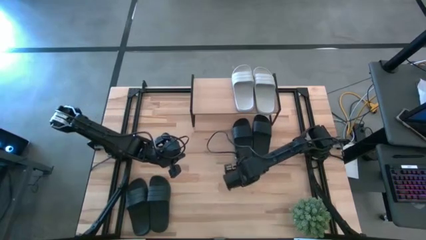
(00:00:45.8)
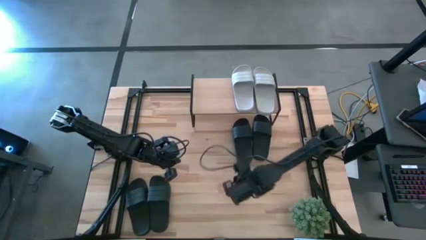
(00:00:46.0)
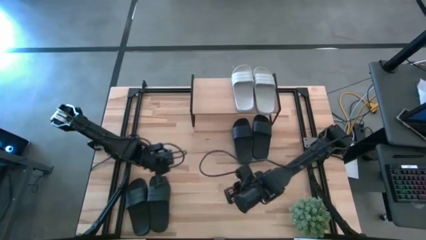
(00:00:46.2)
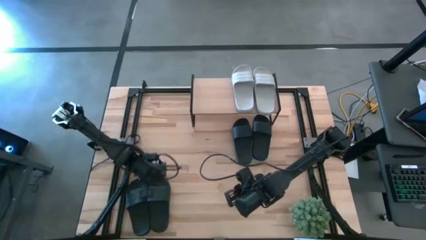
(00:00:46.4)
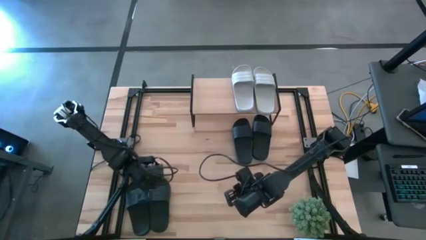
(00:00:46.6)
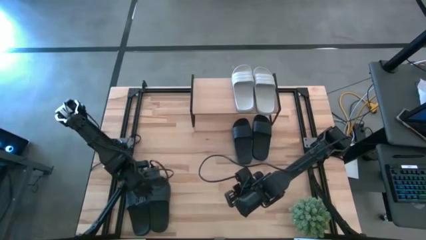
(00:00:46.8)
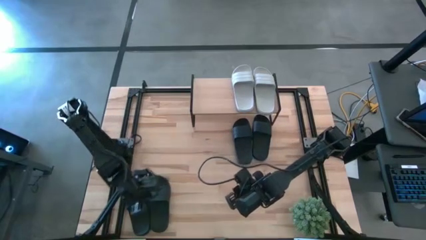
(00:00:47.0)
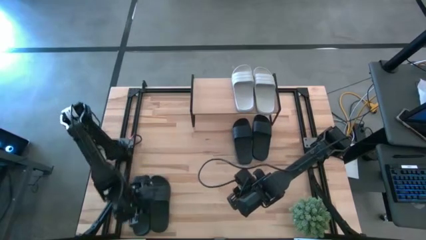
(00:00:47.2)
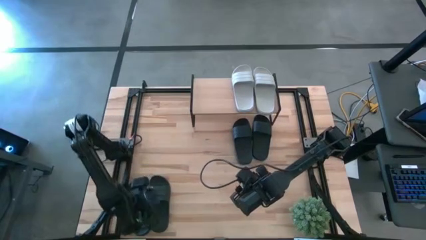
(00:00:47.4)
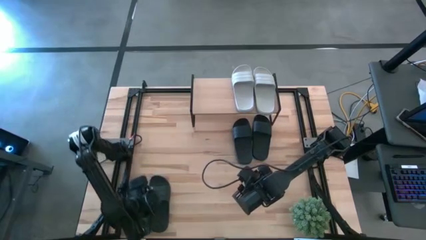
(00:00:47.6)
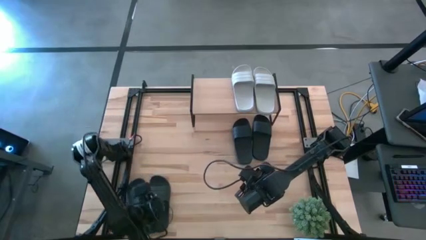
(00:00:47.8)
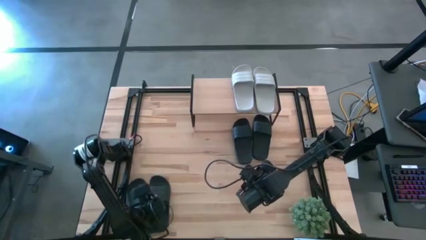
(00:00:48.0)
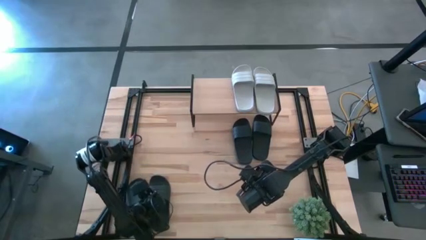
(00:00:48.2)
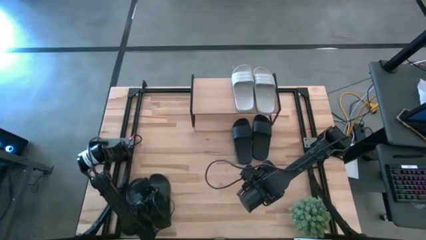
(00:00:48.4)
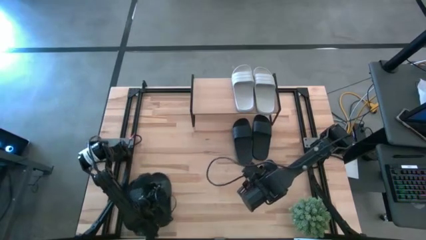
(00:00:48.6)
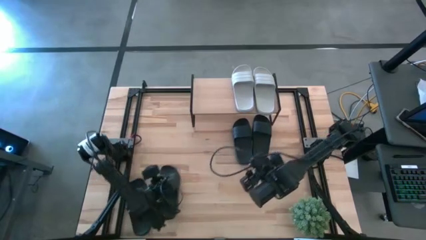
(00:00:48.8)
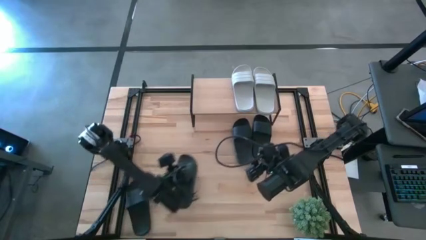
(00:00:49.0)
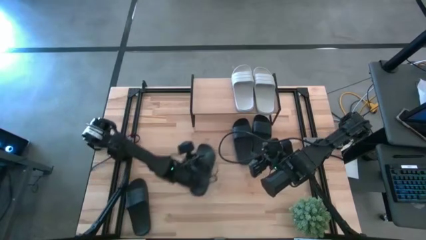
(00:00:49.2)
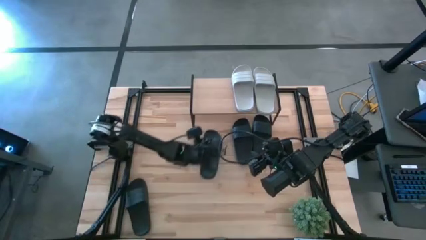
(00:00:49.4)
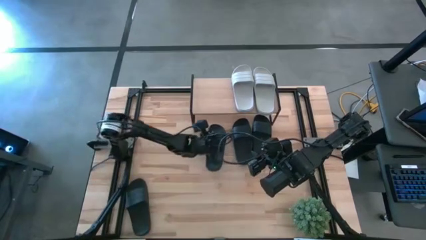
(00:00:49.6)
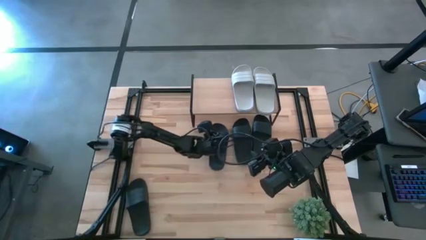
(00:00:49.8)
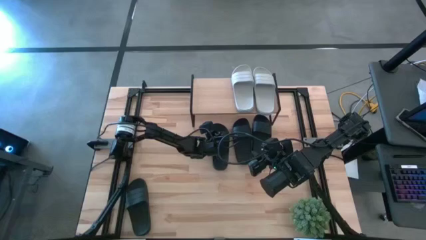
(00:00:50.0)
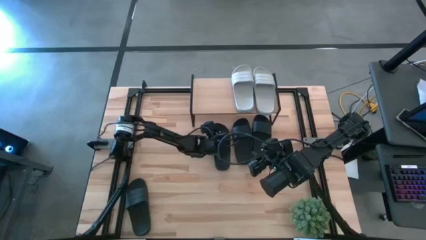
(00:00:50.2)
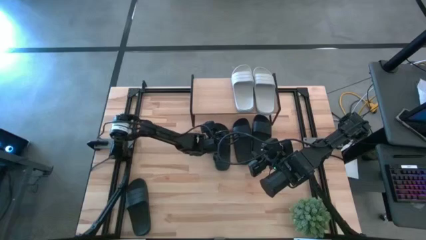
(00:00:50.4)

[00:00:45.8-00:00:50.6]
Task: Pick and place slides into the shelf
Put the black slide under the shelf

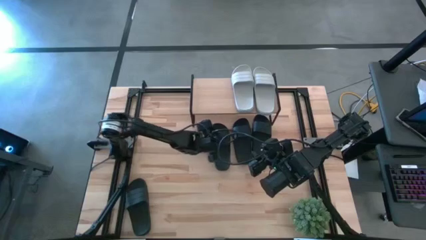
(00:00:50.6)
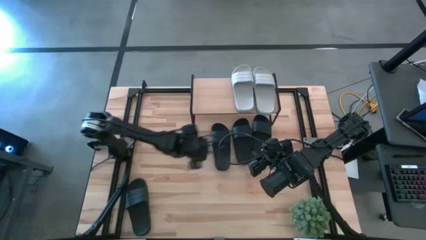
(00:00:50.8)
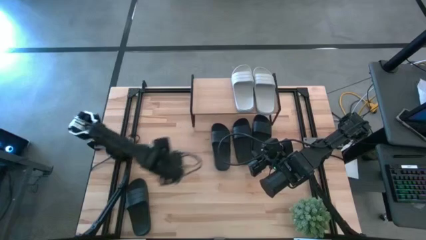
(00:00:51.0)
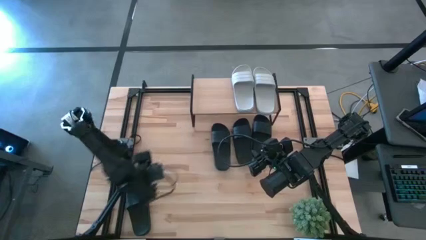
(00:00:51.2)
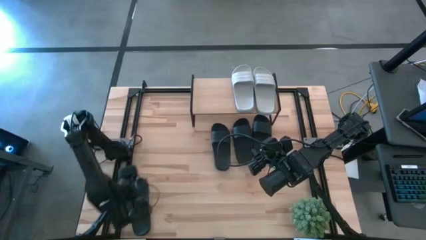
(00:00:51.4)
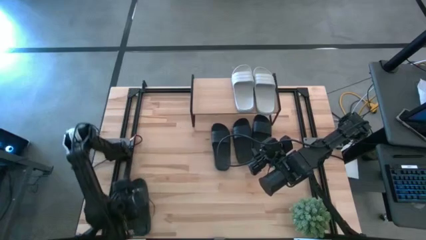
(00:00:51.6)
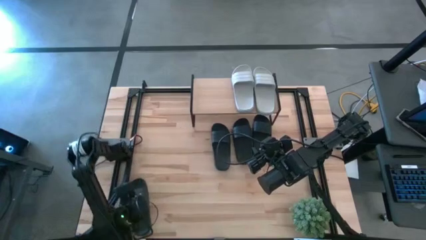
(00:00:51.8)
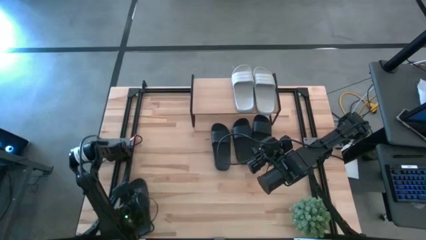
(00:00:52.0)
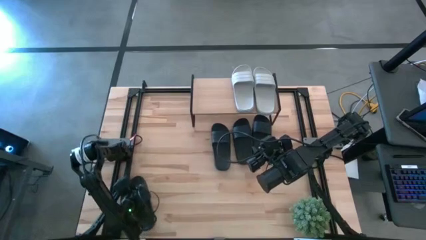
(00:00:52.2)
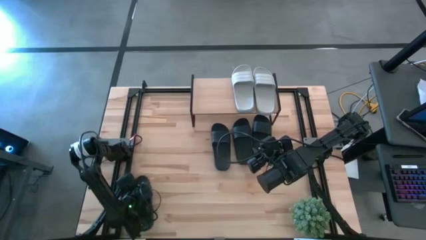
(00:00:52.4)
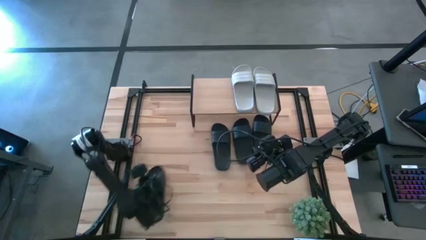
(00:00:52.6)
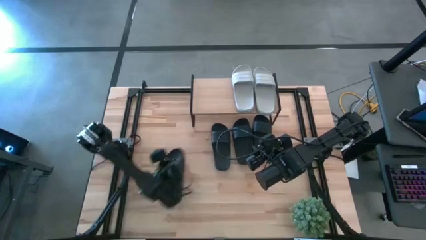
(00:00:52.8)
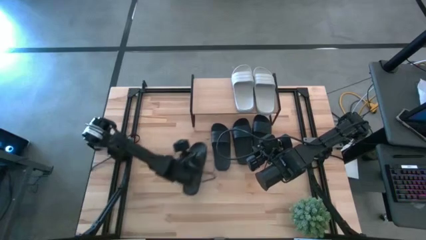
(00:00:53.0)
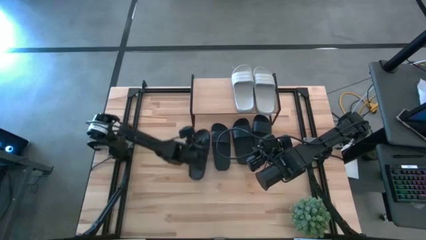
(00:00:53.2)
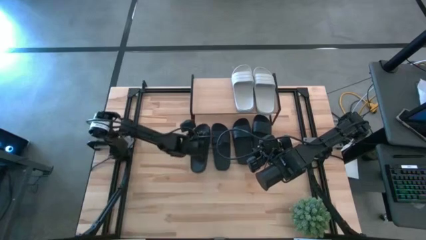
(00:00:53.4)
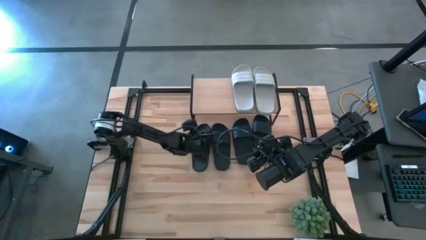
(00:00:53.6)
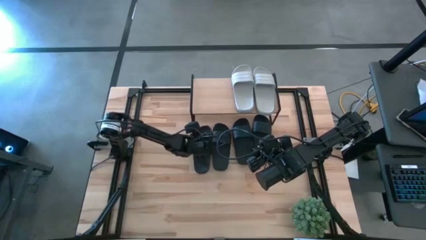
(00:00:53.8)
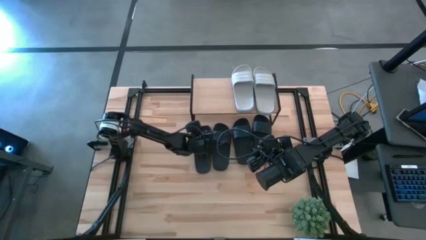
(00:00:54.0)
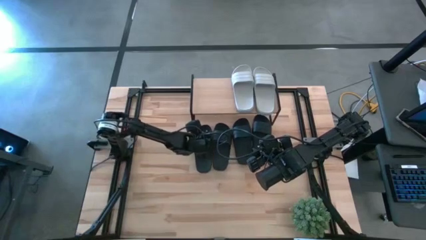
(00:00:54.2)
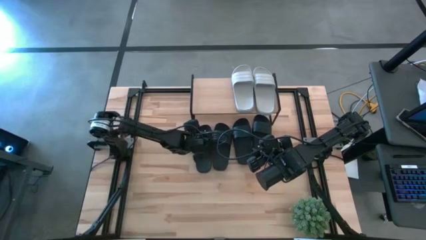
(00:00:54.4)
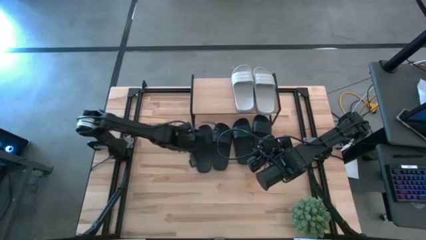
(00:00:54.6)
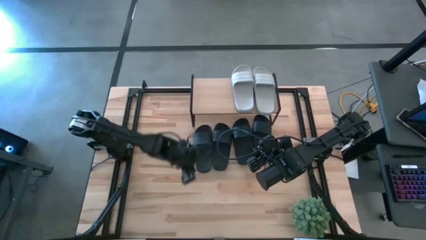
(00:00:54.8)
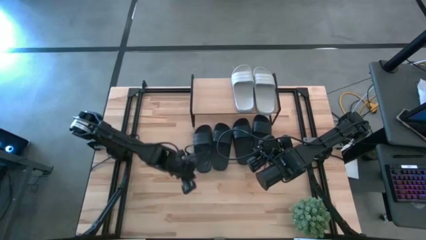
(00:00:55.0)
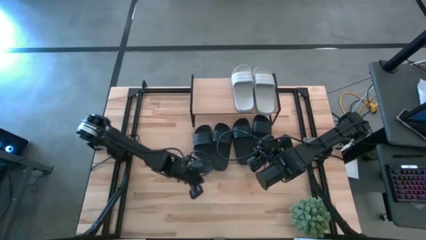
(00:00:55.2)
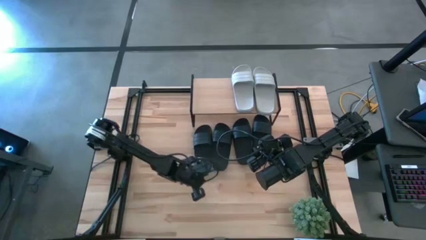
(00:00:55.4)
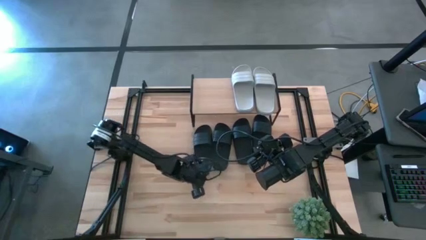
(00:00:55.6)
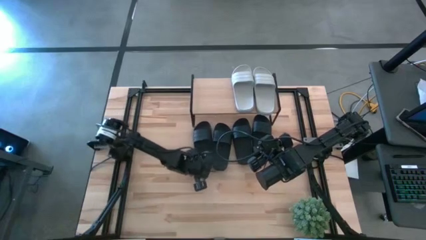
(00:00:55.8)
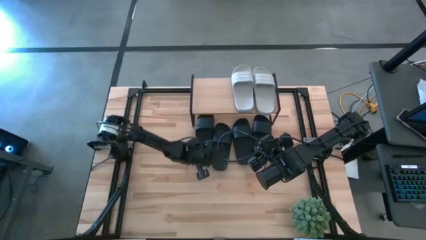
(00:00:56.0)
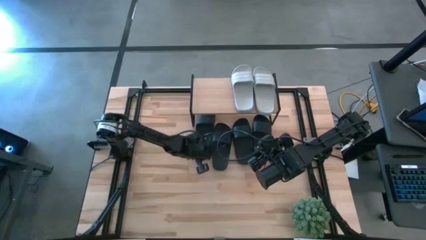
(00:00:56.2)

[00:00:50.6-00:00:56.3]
Put the black slide under the shelf
